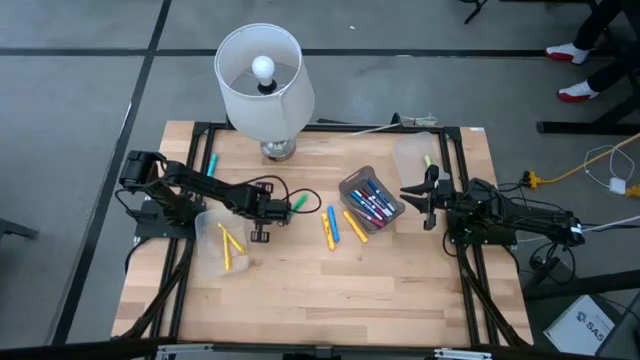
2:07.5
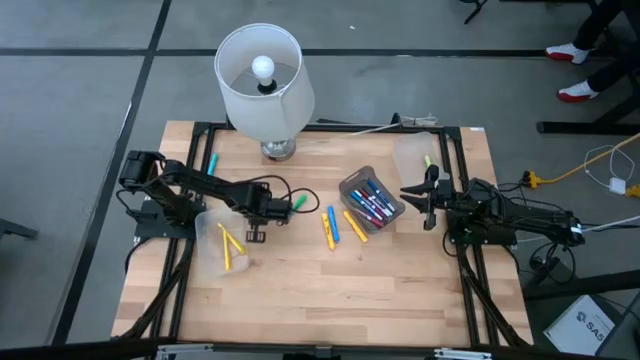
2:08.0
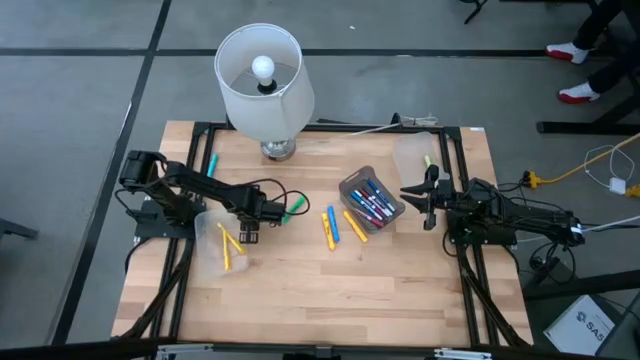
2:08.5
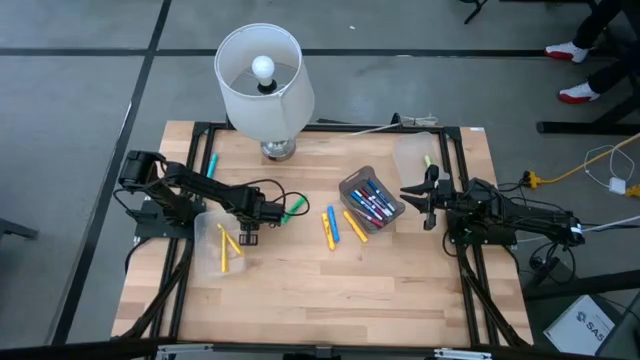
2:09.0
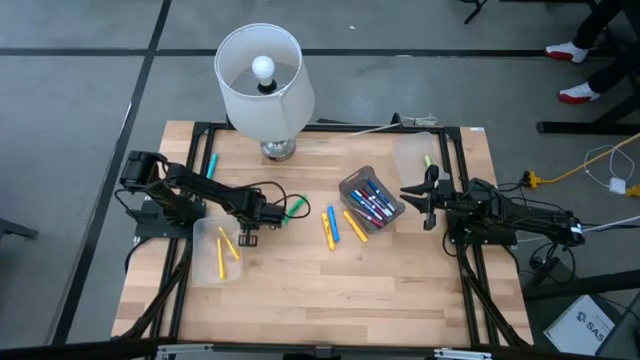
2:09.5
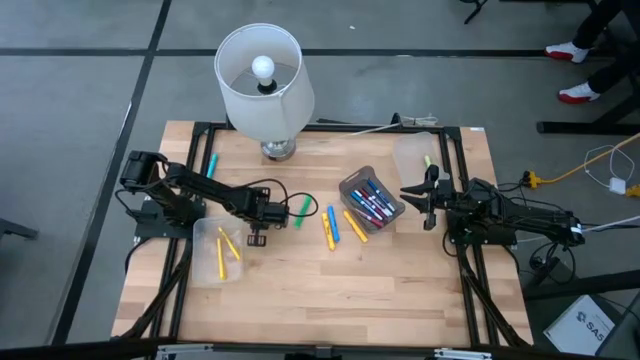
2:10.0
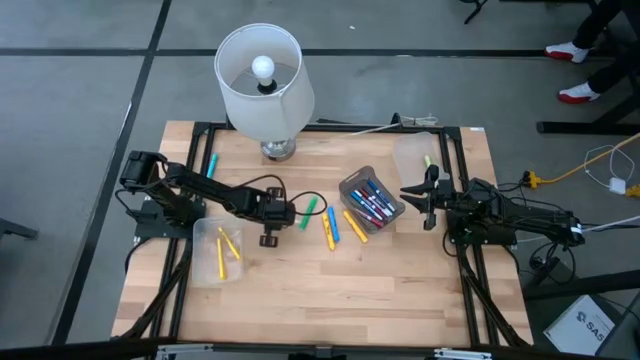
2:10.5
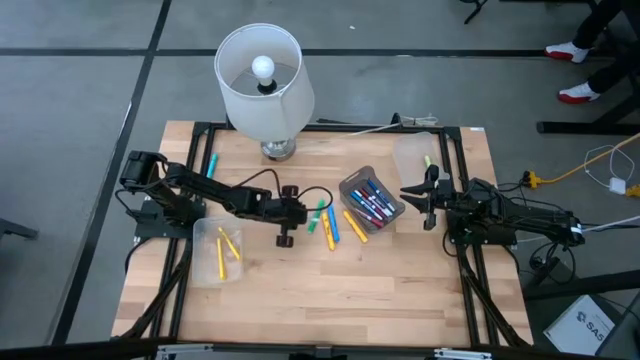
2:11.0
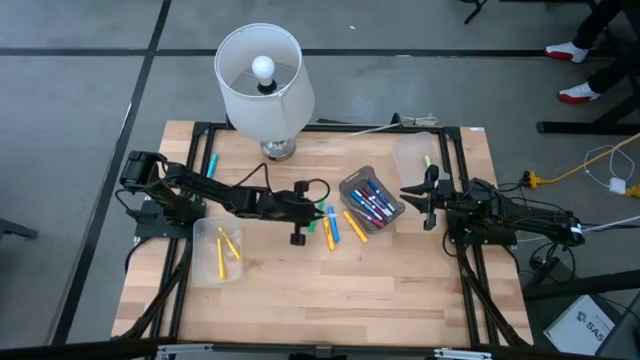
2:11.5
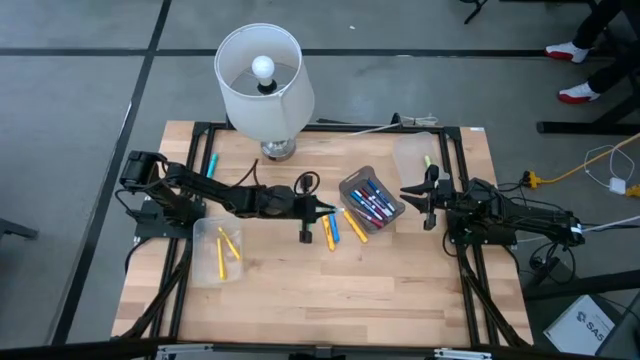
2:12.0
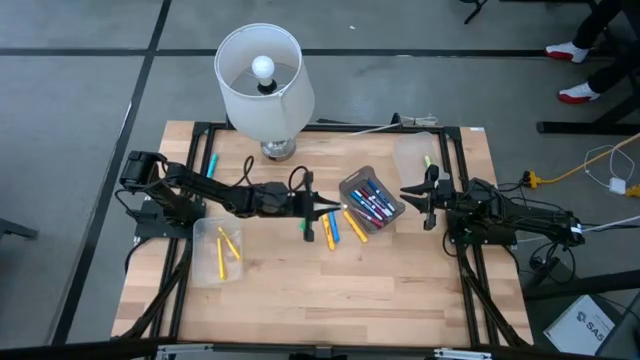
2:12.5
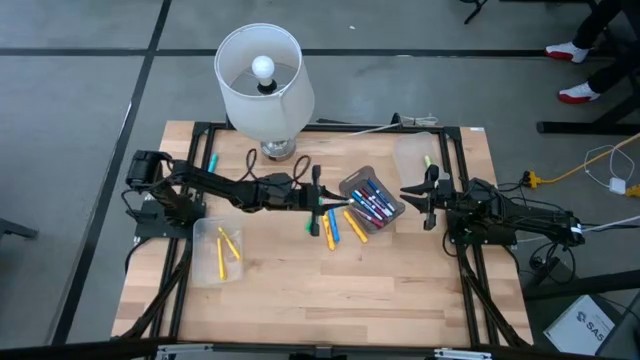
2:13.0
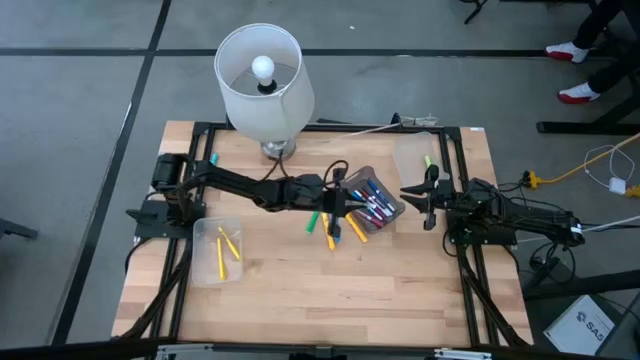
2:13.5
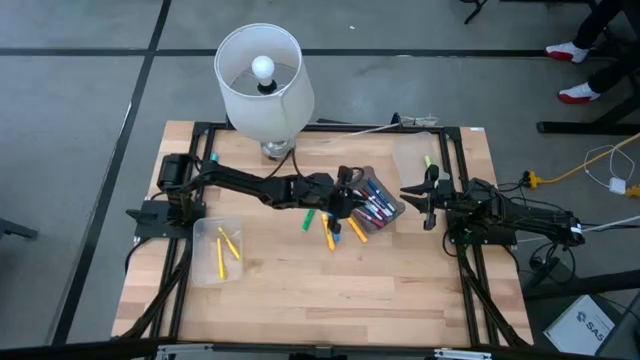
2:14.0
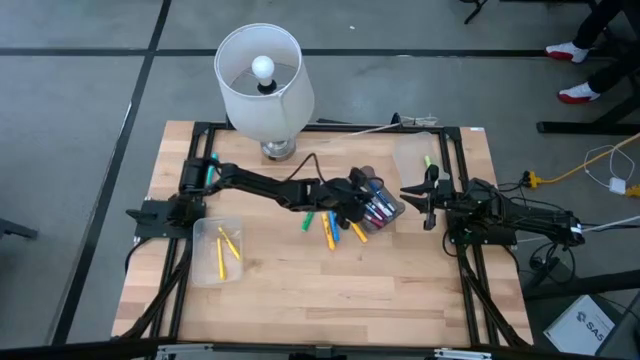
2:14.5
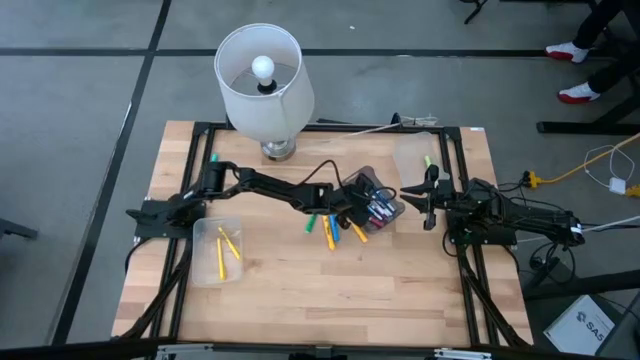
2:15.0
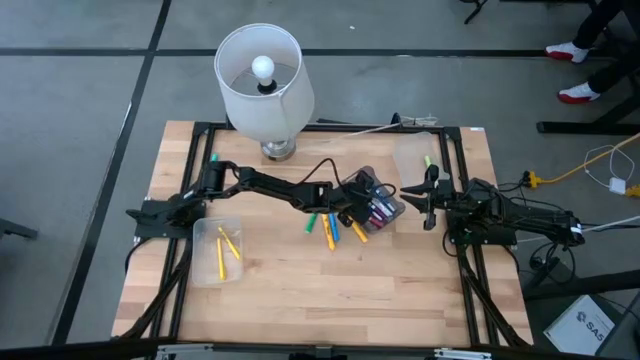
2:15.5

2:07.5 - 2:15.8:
Task: Pick & Place Markers
Put the light green marker pen into the black bin

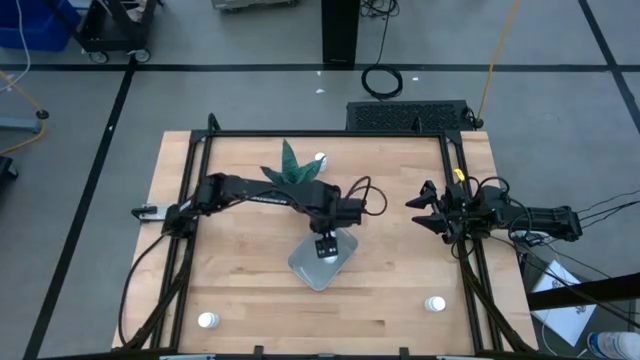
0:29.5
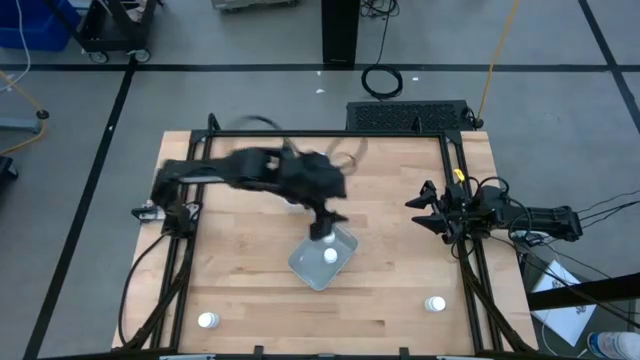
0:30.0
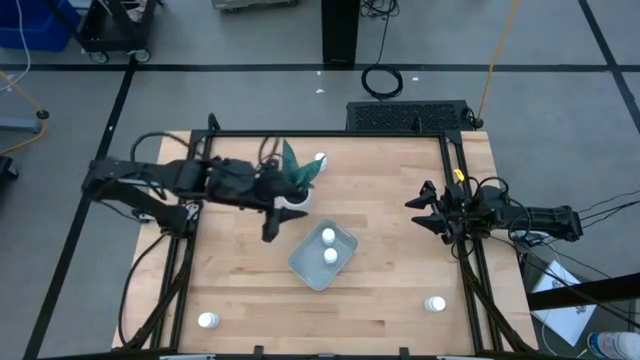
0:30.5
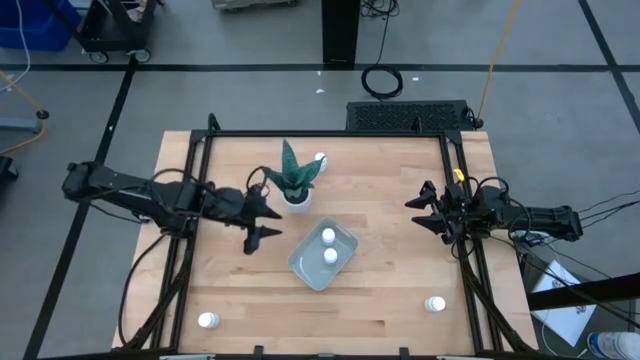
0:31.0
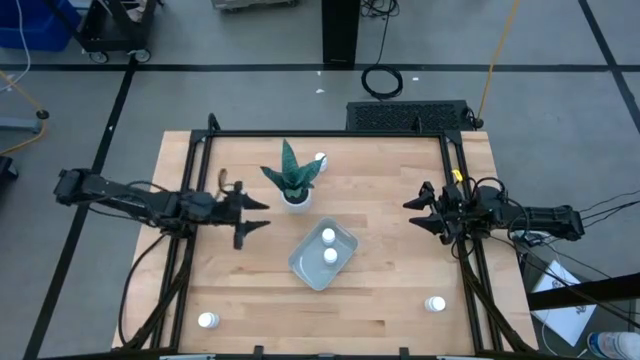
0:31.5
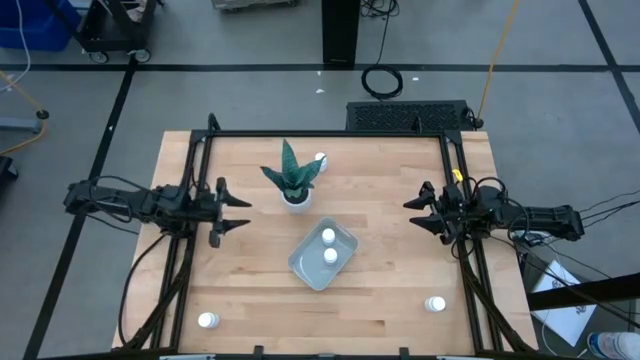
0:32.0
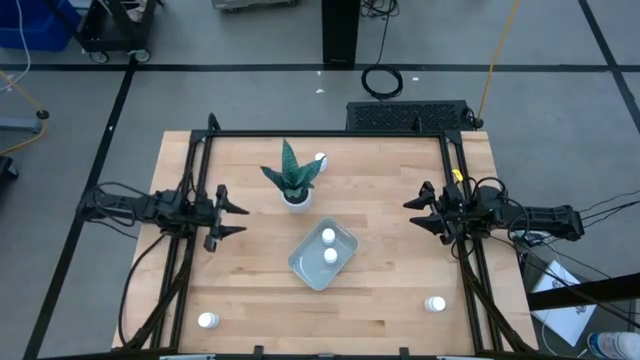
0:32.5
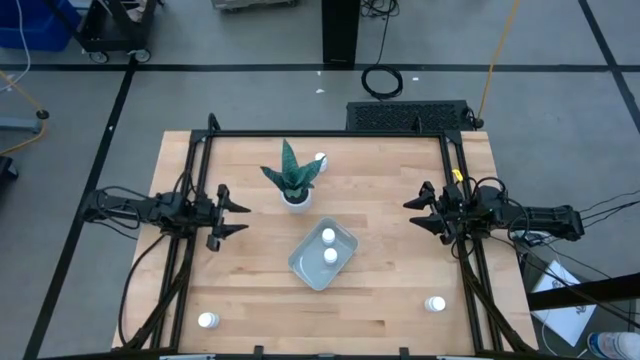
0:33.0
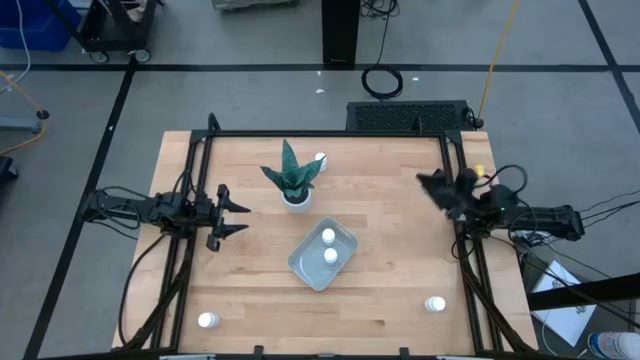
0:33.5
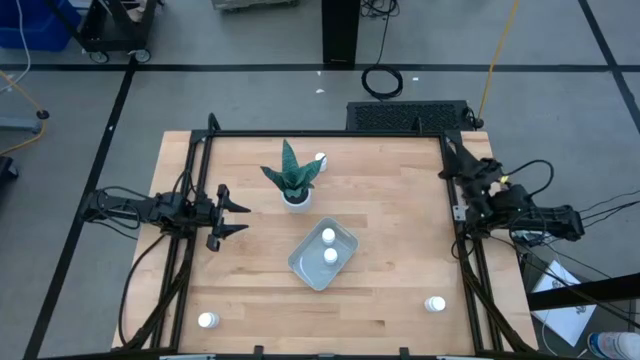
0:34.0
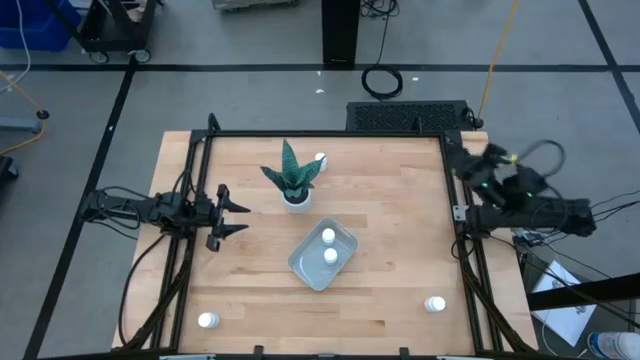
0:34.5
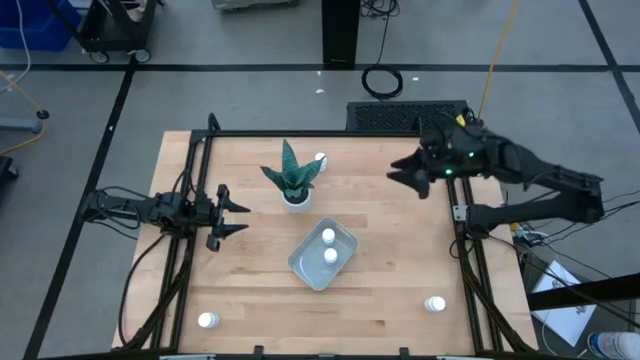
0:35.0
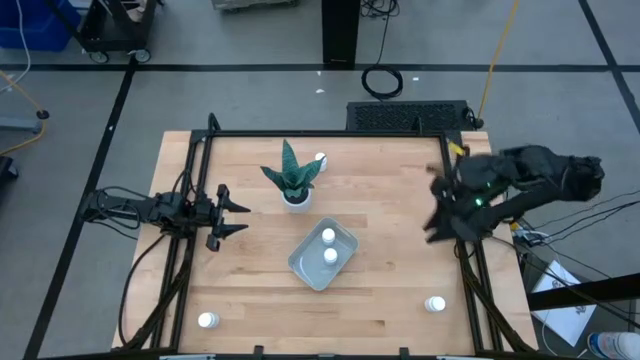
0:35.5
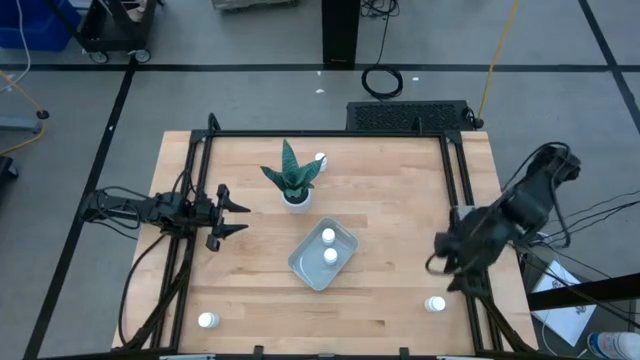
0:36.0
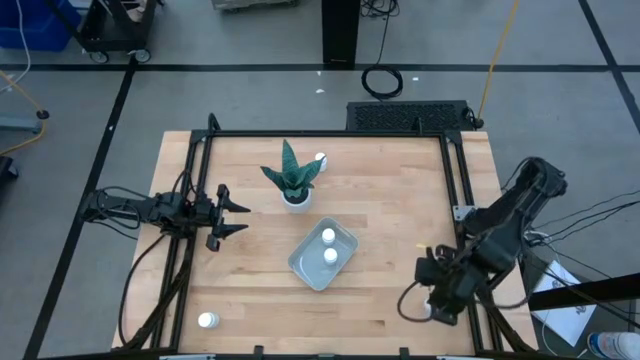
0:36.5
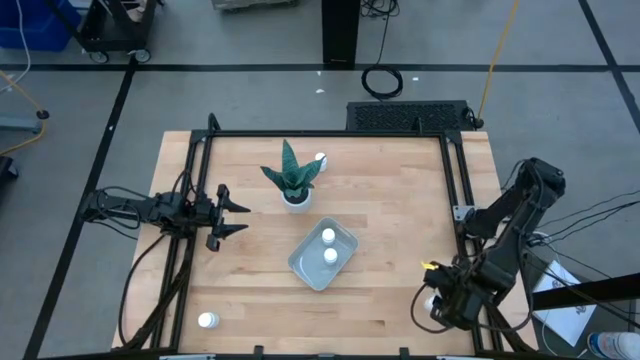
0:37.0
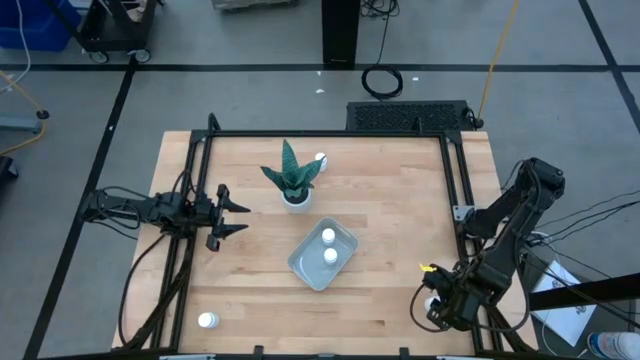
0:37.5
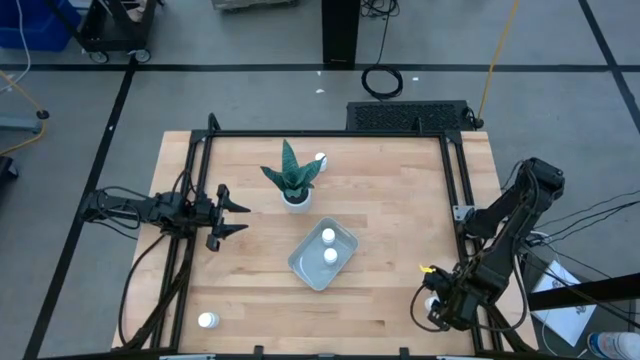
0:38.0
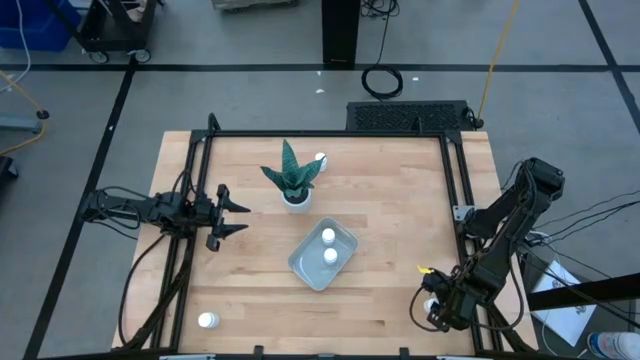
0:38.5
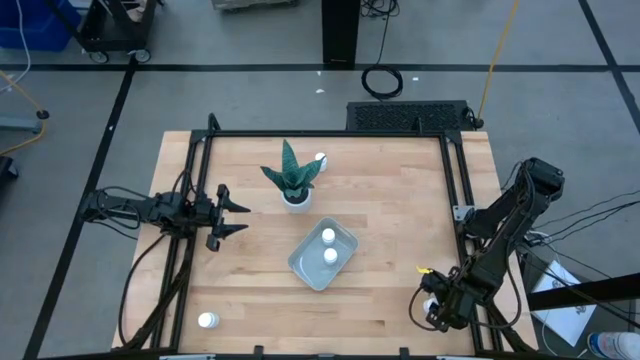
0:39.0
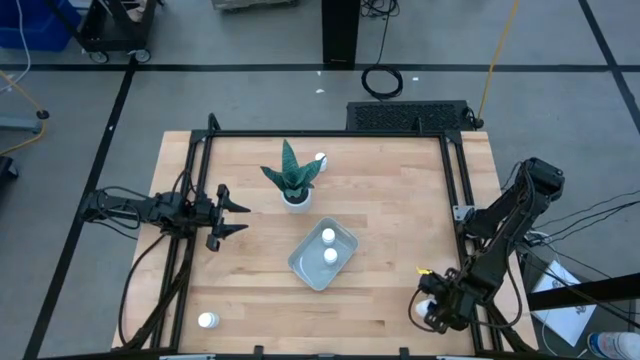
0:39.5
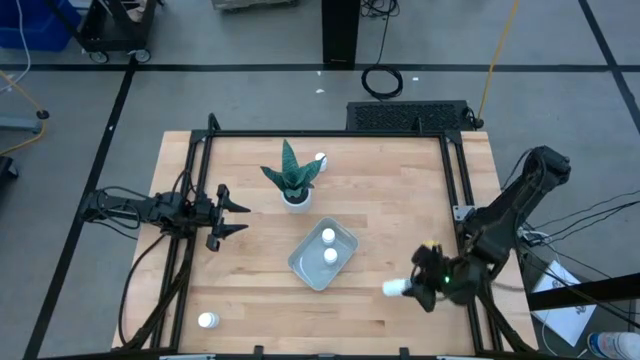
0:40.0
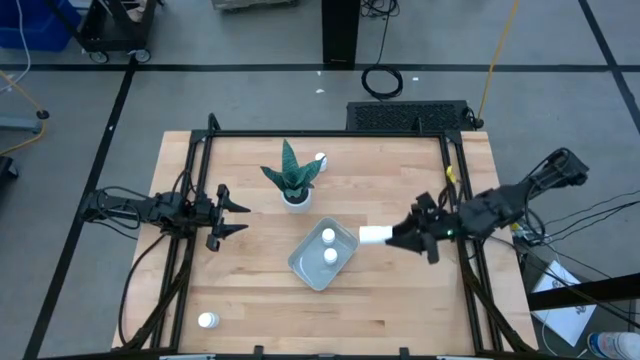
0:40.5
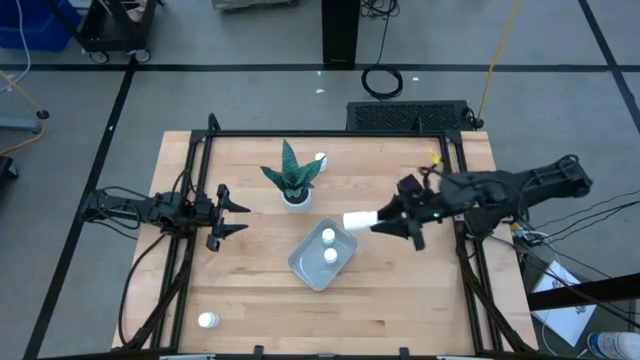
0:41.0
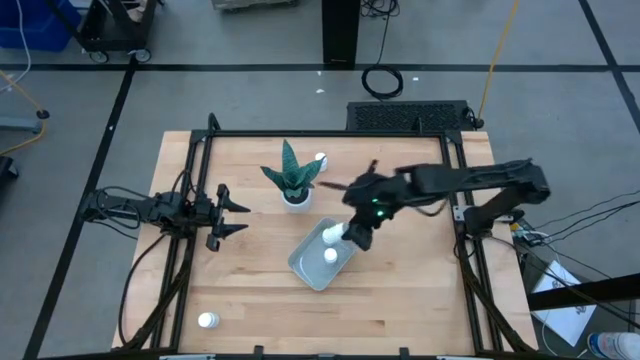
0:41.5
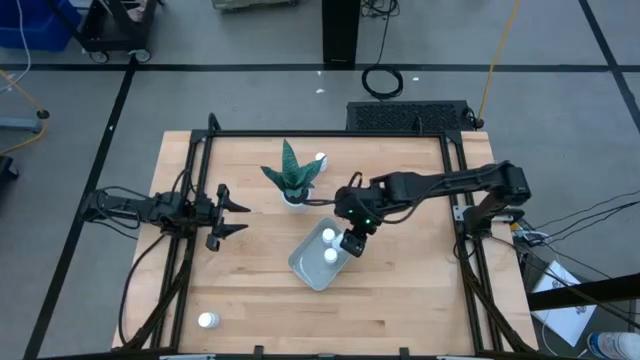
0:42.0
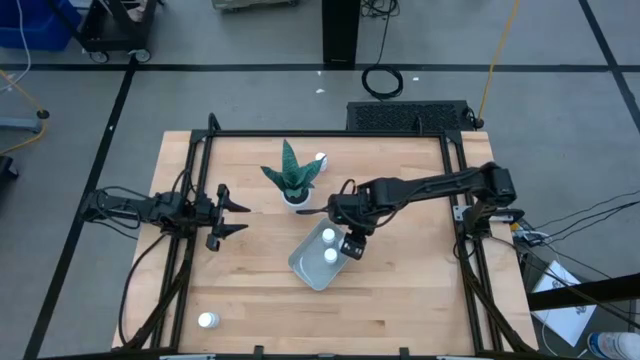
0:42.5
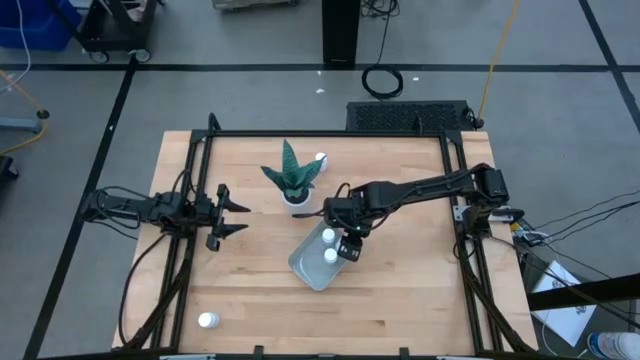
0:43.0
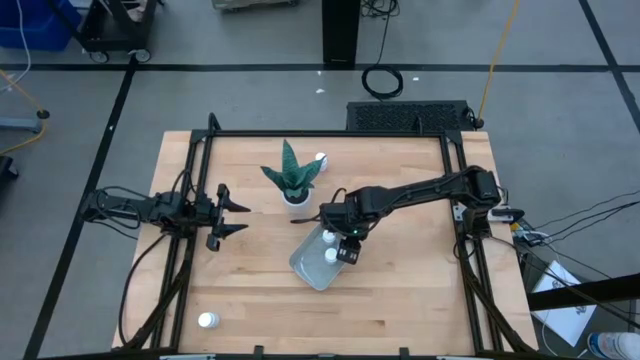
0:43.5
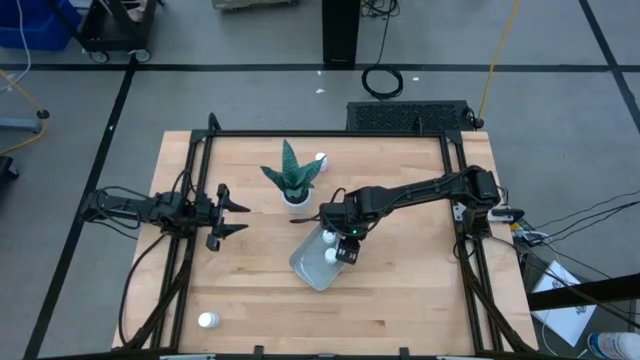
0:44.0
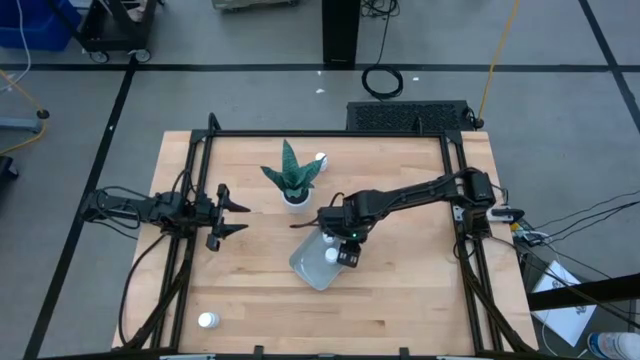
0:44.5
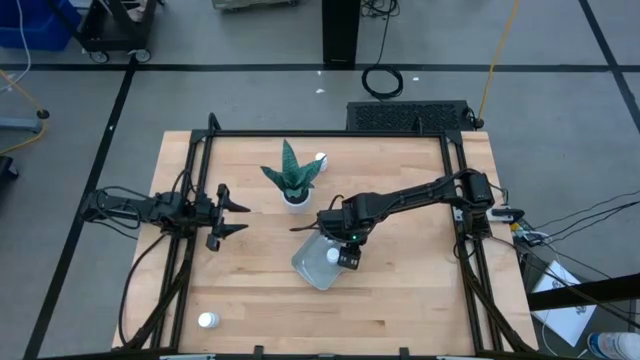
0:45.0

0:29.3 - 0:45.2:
Task: Pick and place pill bottles into a basket
Put the white medicine bottle into the gray bin
